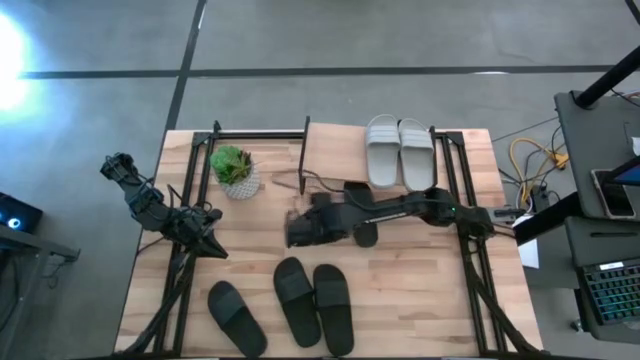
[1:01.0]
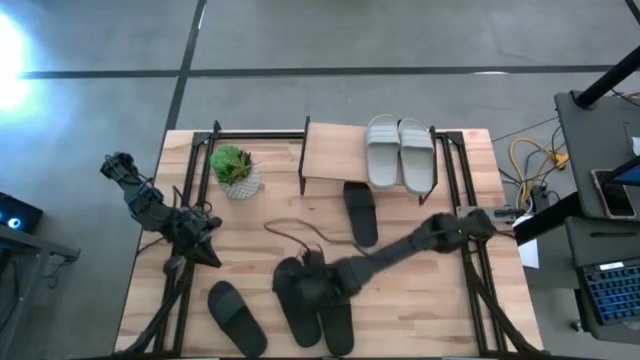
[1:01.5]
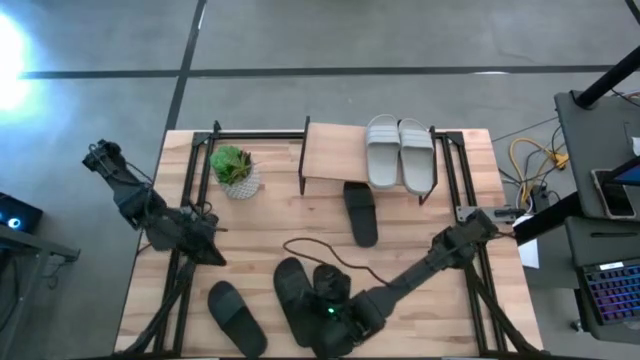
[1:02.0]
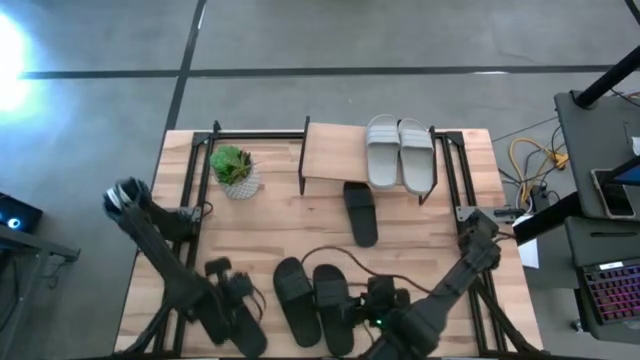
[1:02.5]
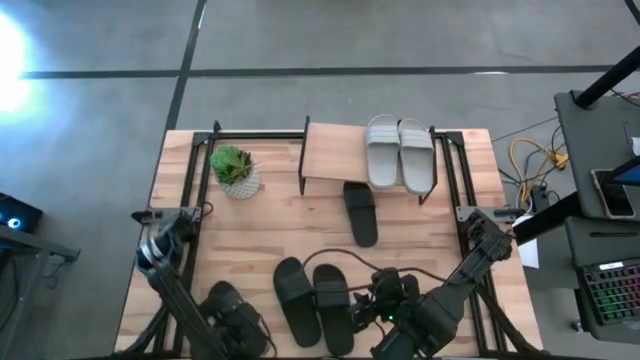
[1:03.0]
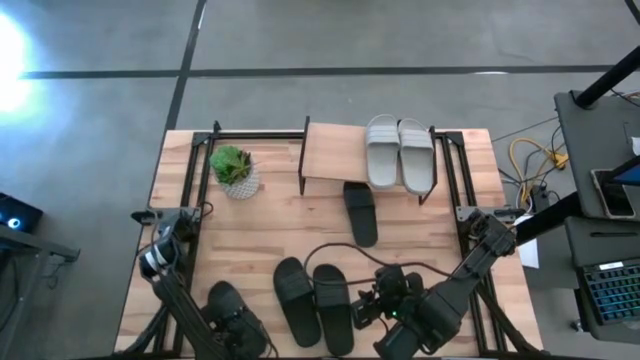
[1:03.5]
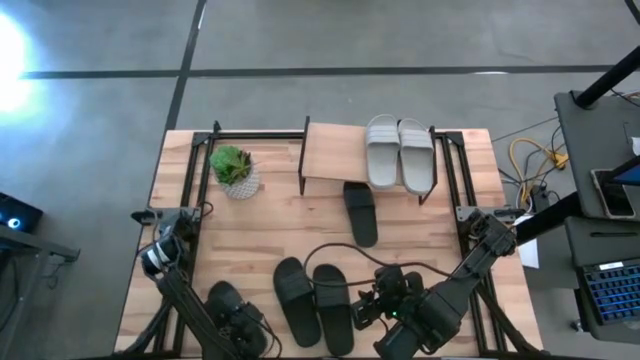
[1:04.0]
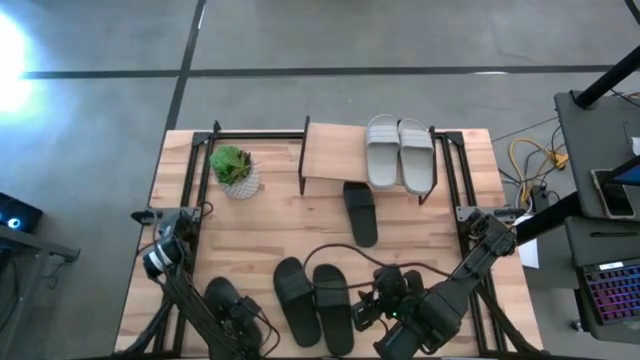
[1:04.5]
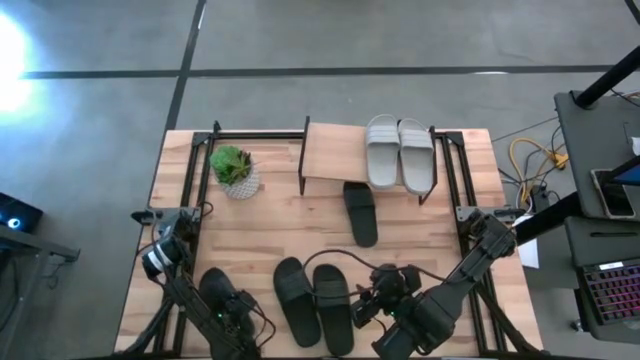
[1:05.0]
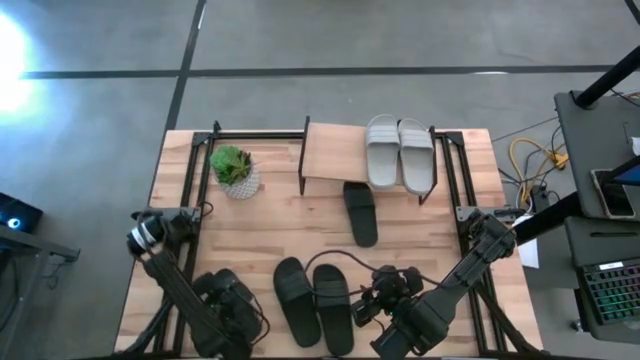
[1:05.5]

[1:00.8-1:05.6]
Task: Pick and place slides into the shelf
Put the black slipper under the shelf

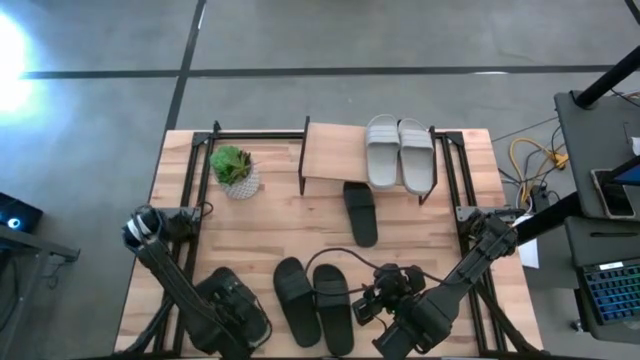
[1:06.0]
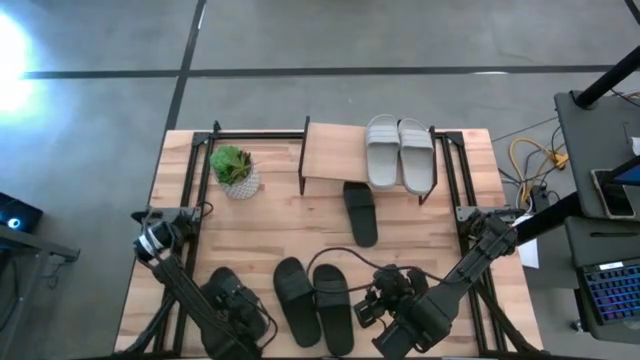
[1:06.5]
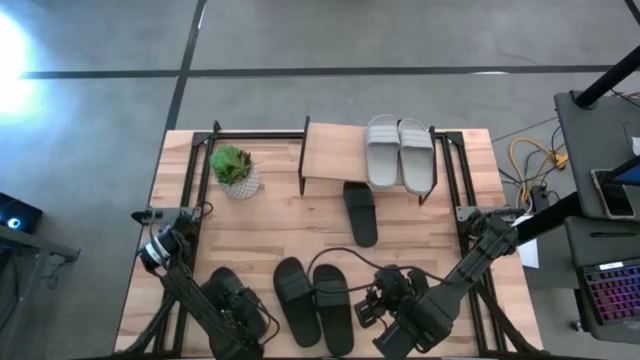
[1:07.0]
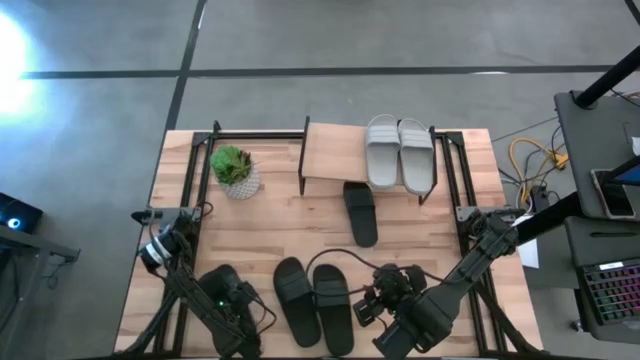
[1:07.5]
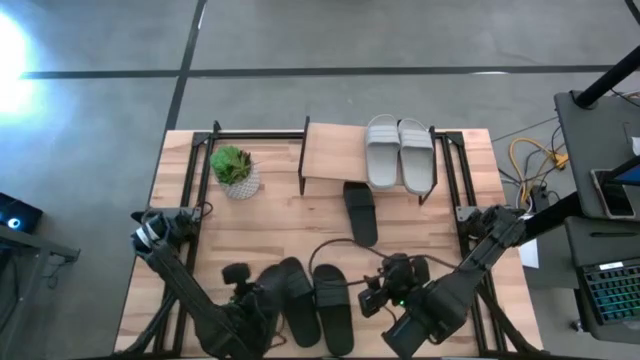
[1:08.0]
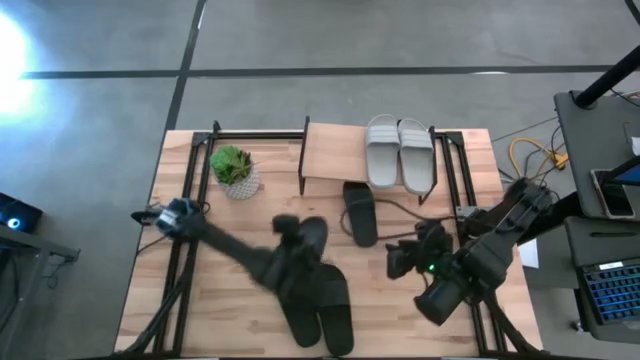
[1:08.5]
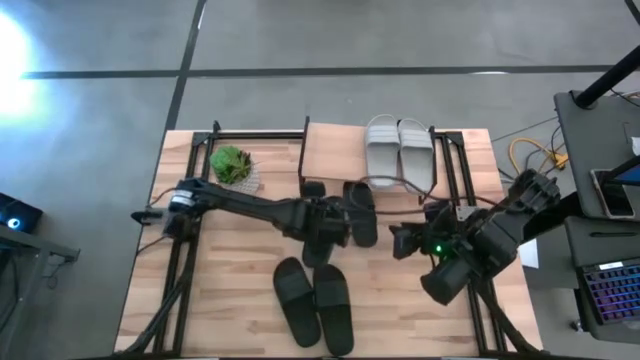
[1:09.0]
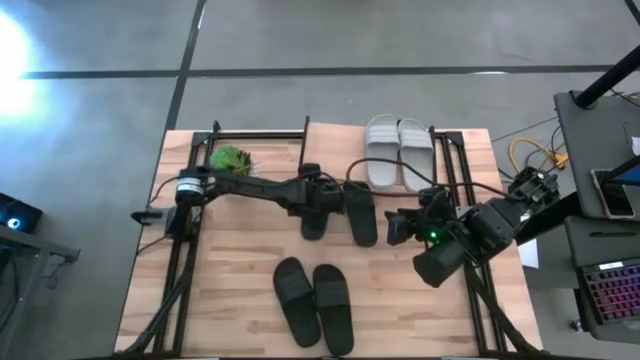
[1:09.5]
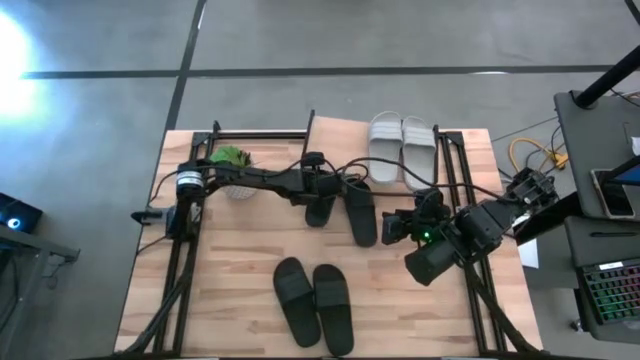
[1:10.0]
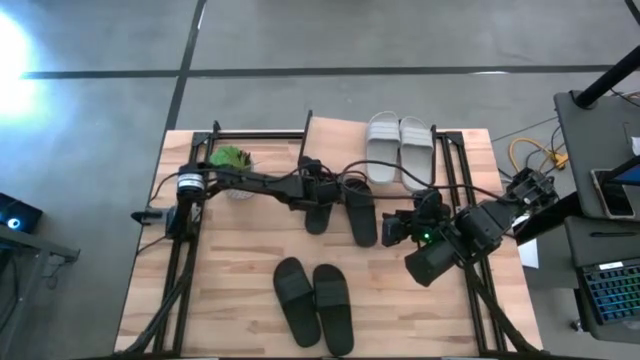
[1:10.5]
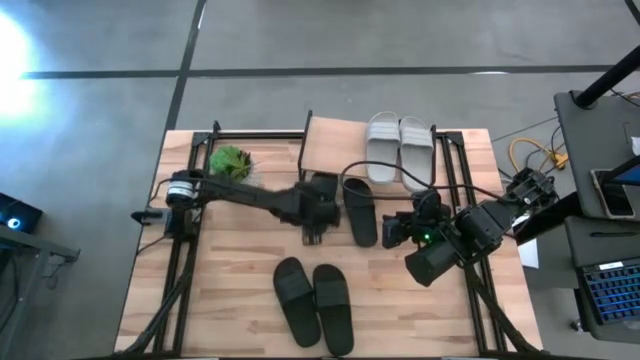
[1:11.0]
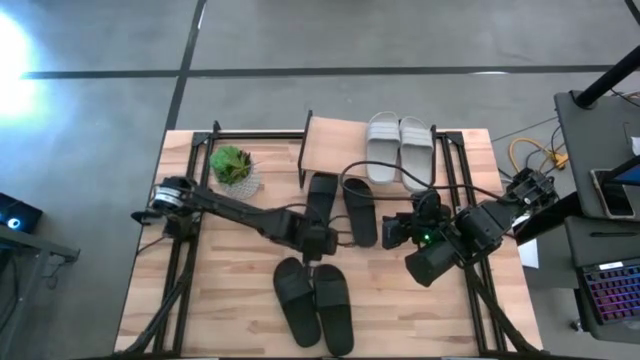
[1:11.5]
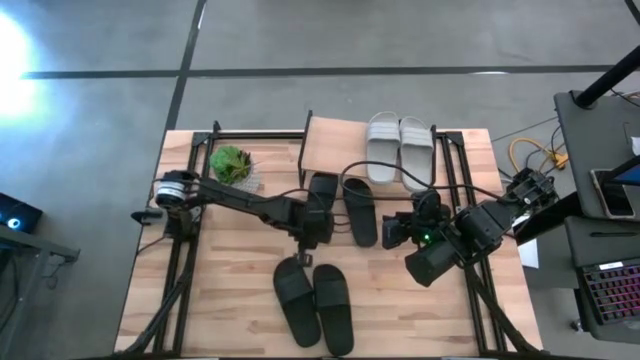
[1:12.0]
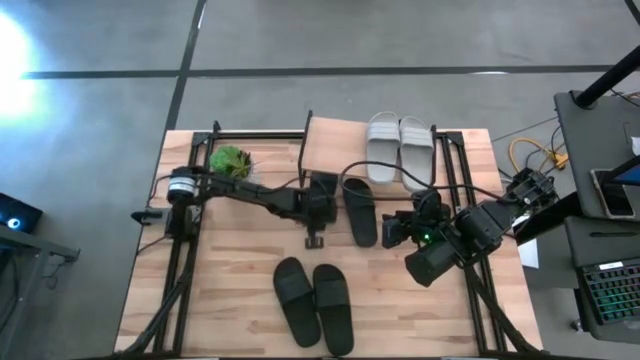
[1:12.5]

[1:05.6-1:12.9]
Put the black slipper under the shelf

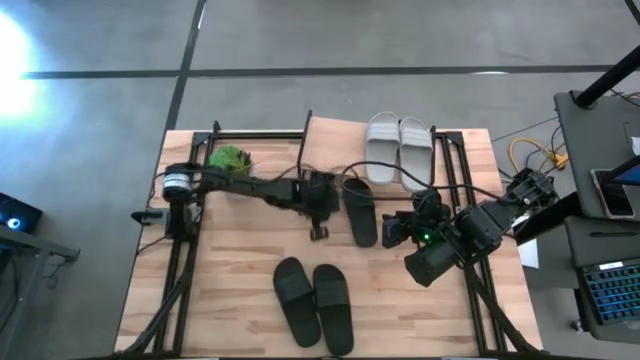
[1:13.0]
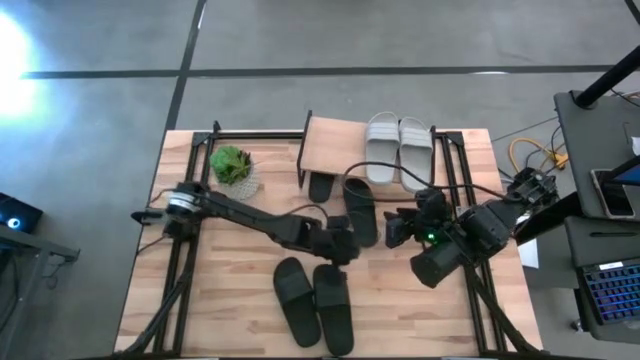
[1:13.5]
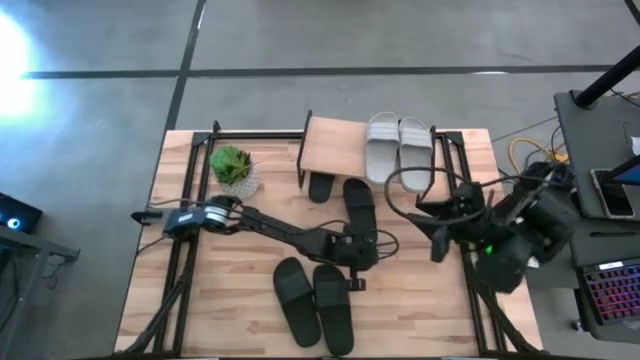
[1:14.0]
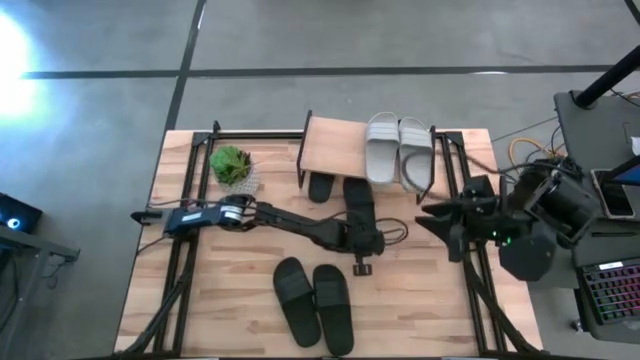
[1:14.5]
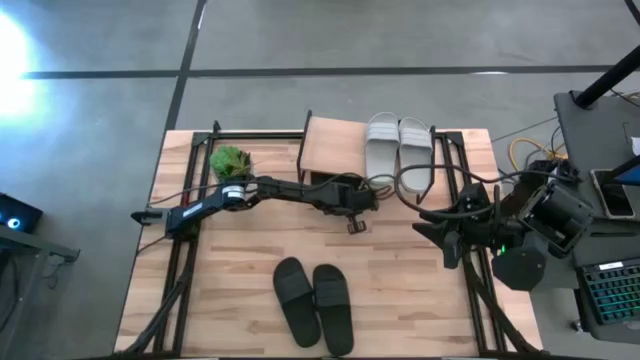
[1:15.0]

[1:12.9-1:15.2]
Adjust the black slipper under the shelf

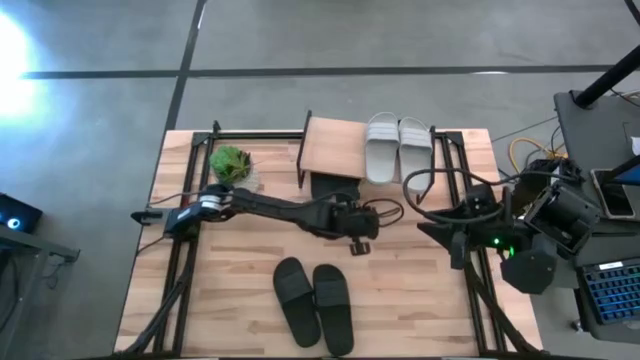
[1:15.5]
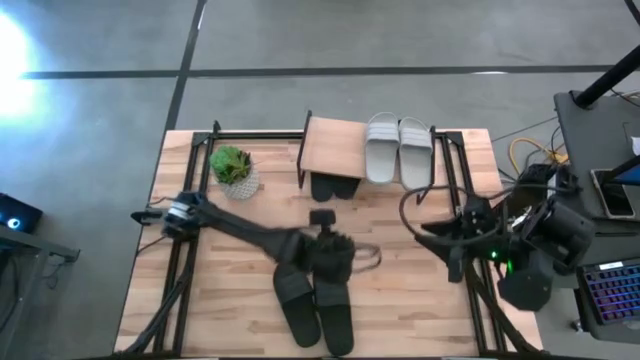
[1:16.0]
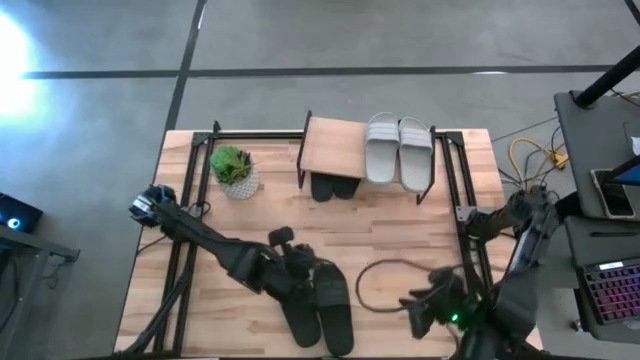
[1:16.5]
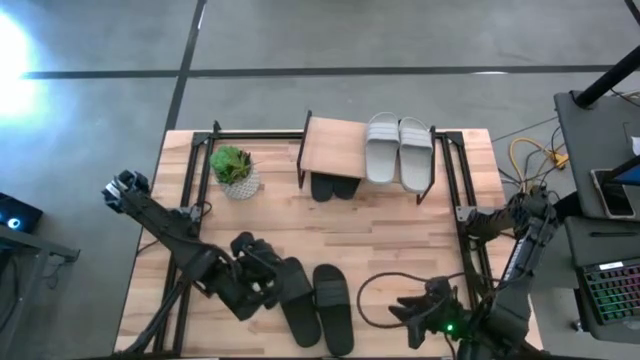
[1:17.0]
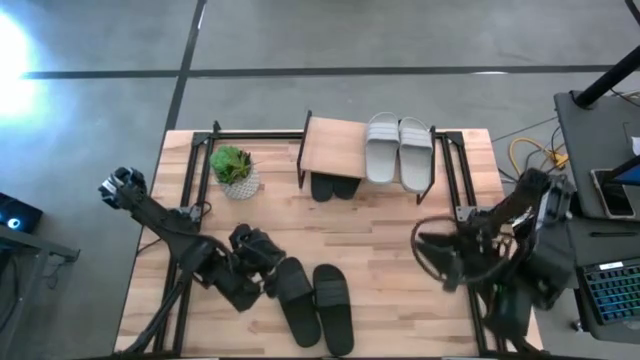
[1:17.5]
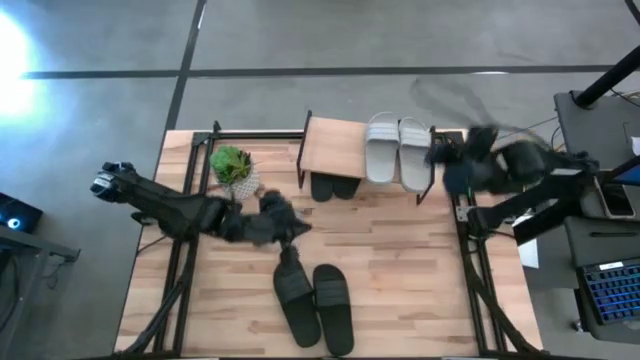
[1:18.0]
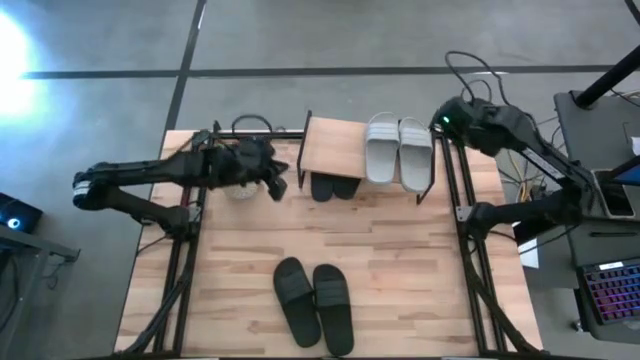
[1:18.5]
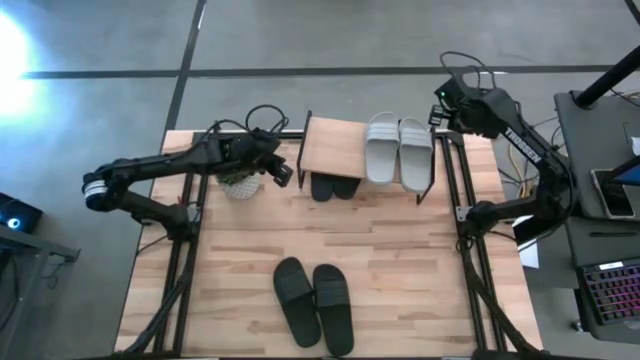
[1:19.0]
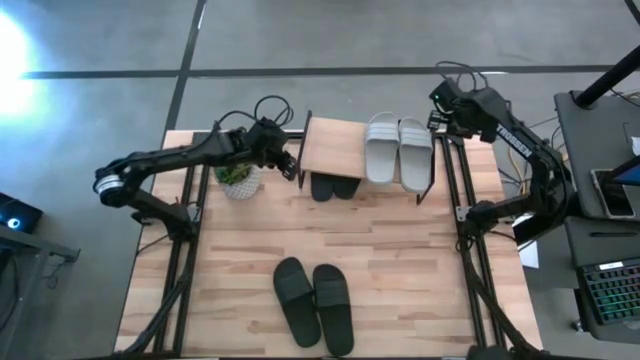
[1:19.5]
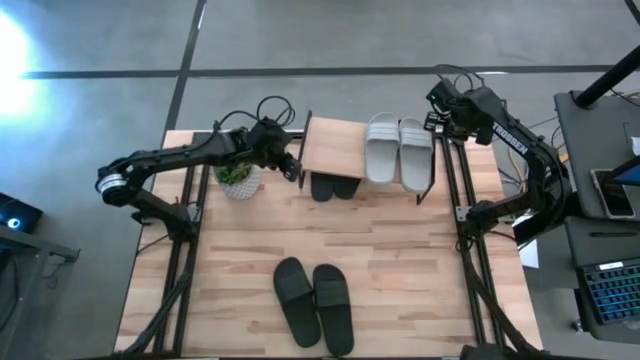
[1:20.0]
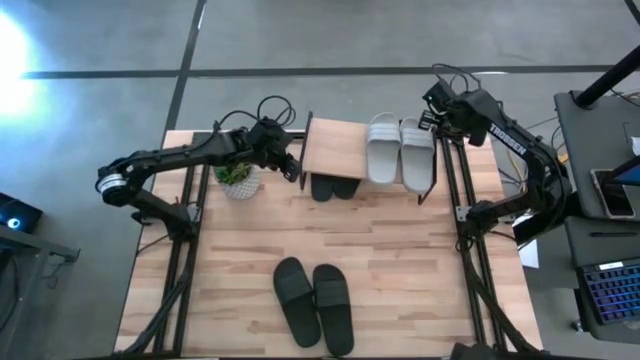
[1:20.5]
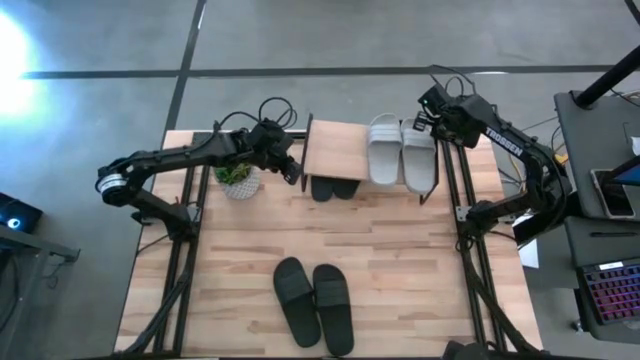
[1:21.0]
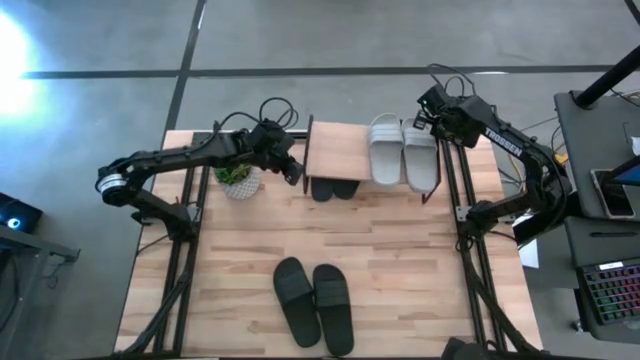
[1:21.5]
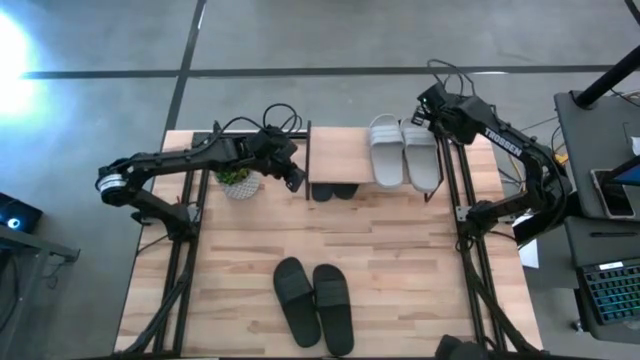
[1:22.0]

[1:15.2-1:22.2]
Adjust the shelf
